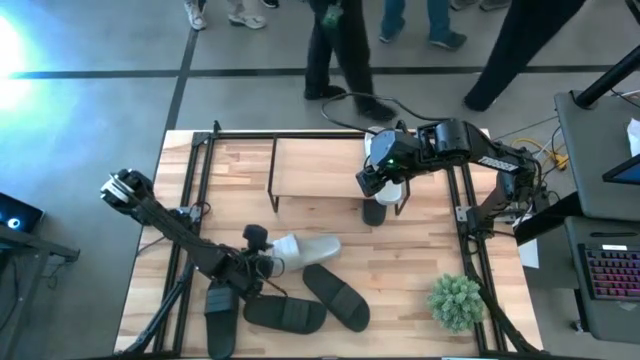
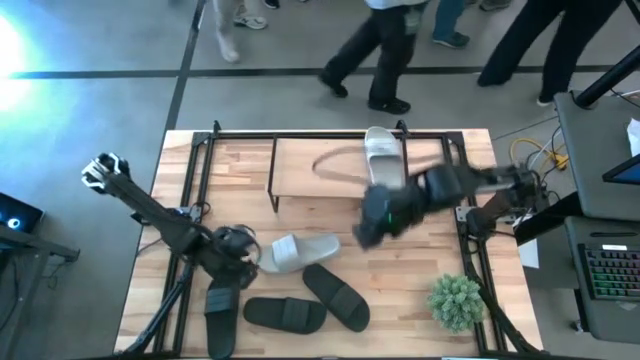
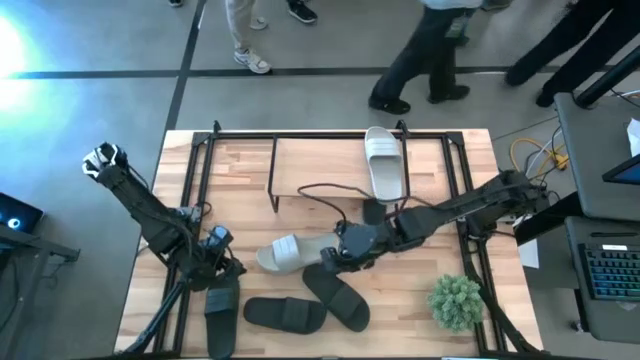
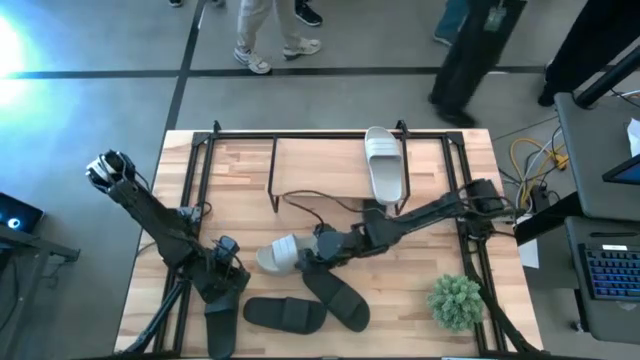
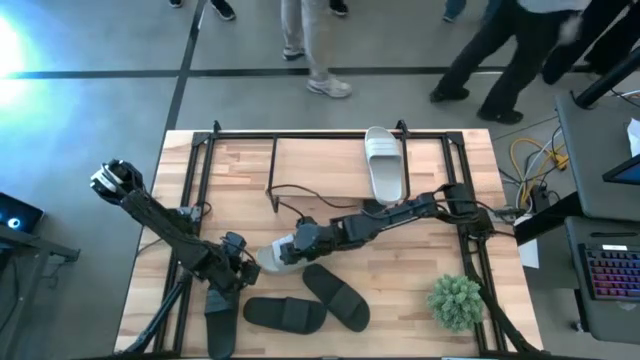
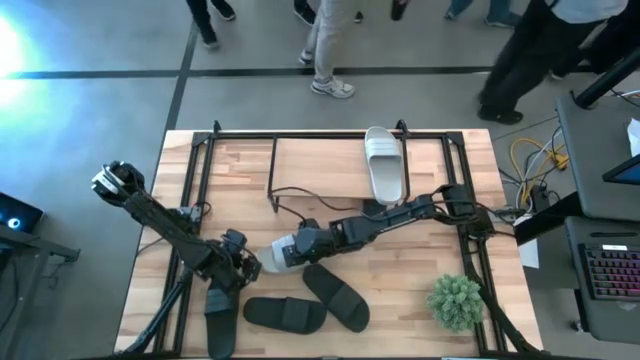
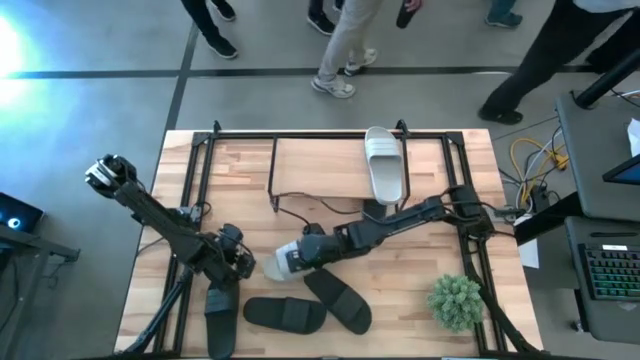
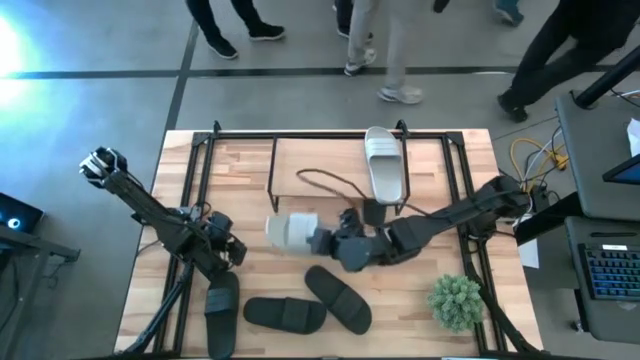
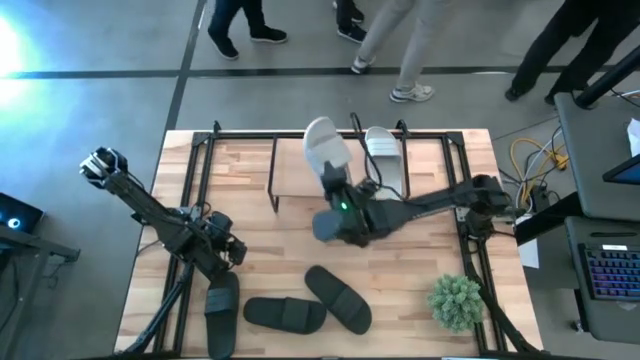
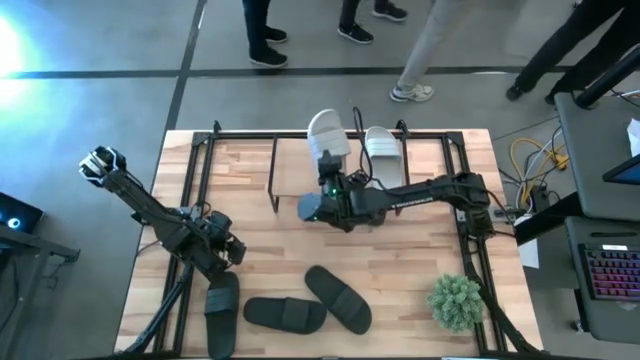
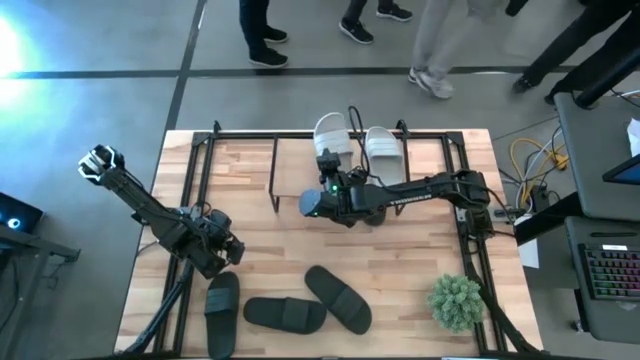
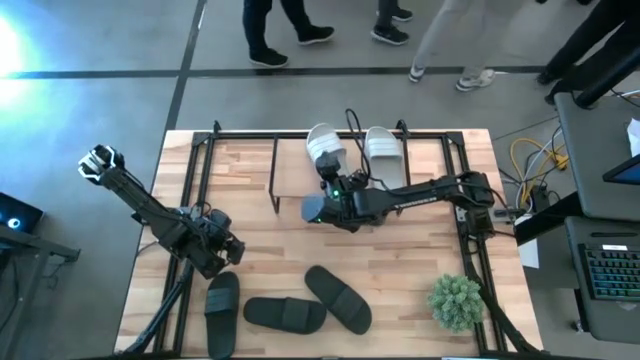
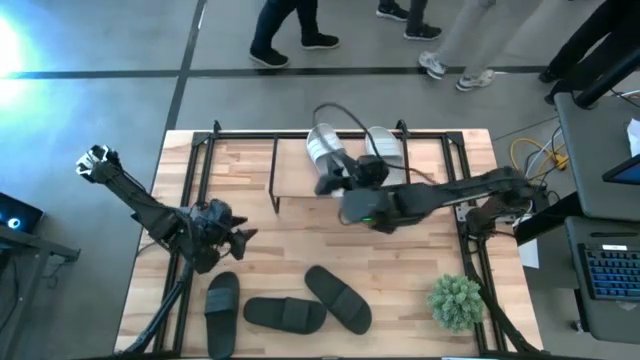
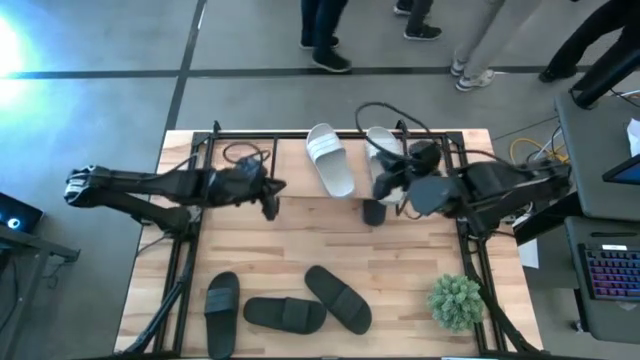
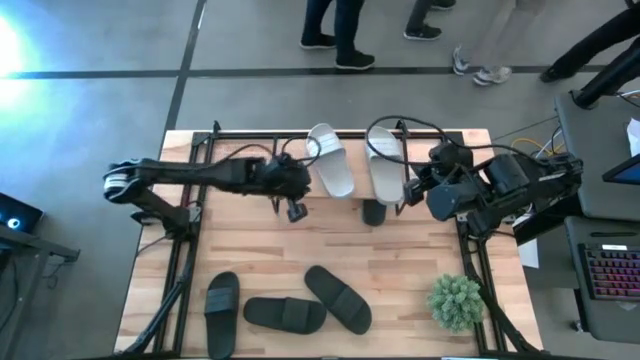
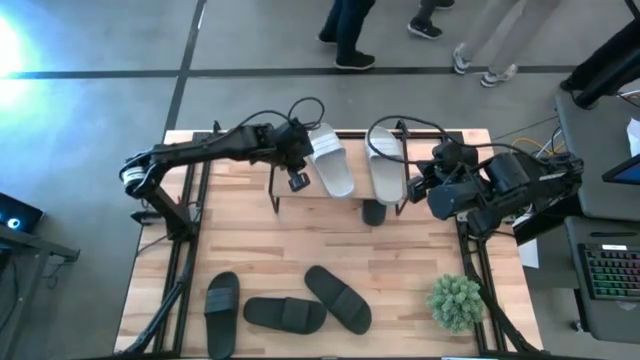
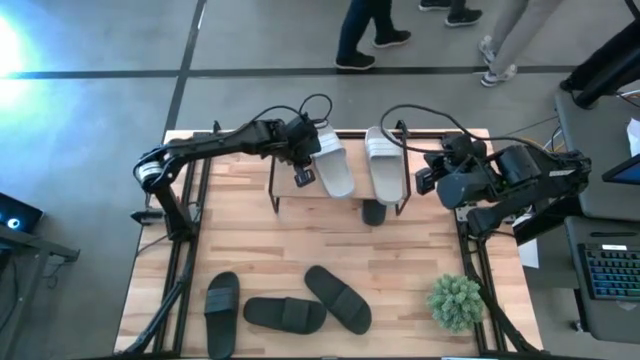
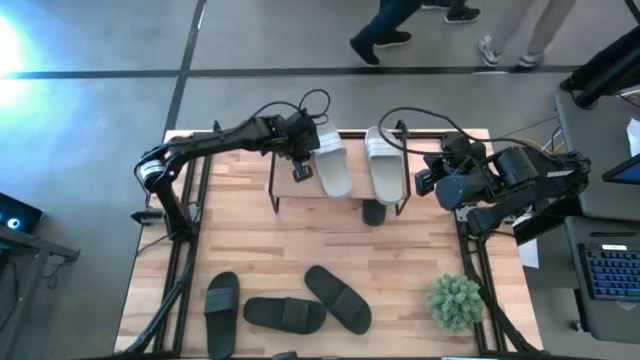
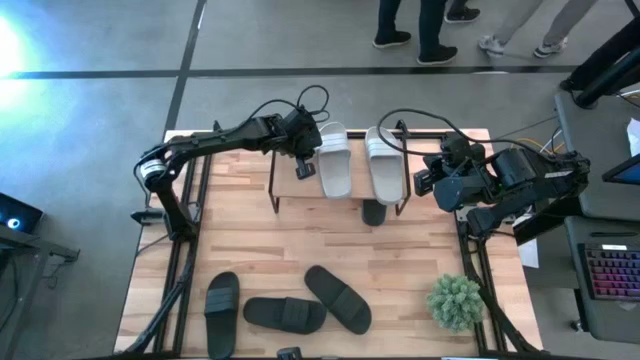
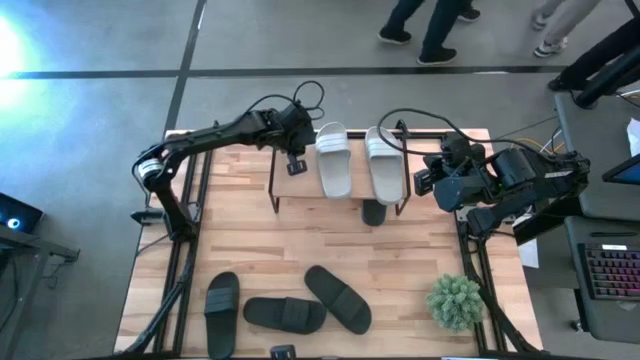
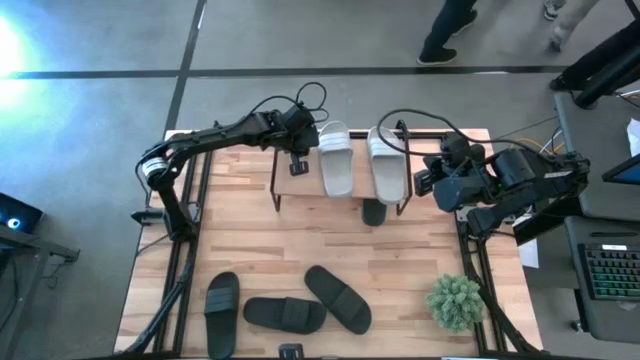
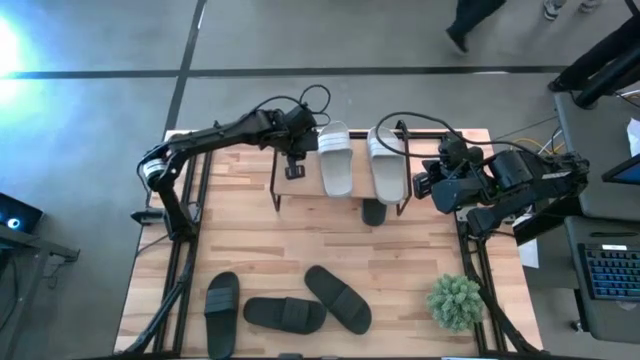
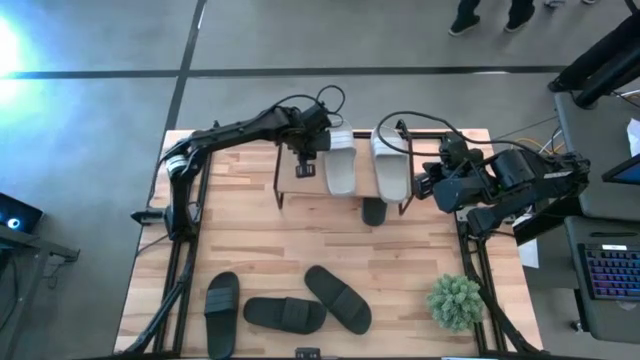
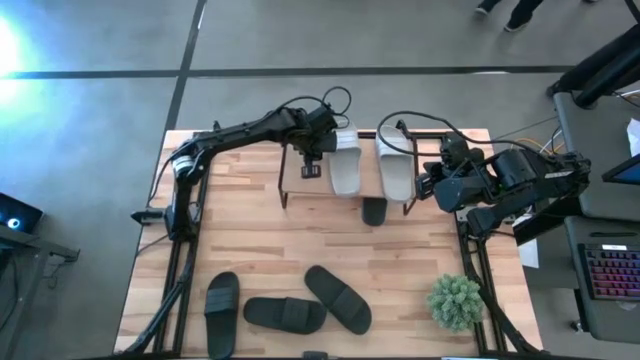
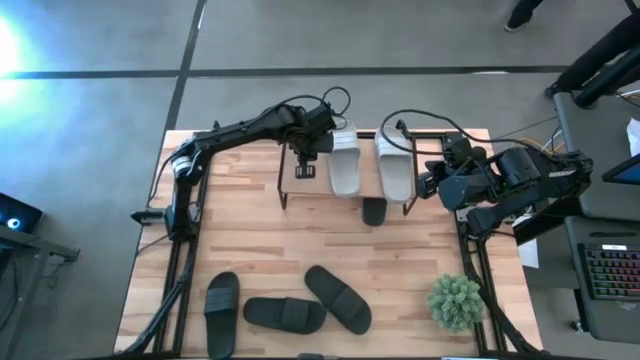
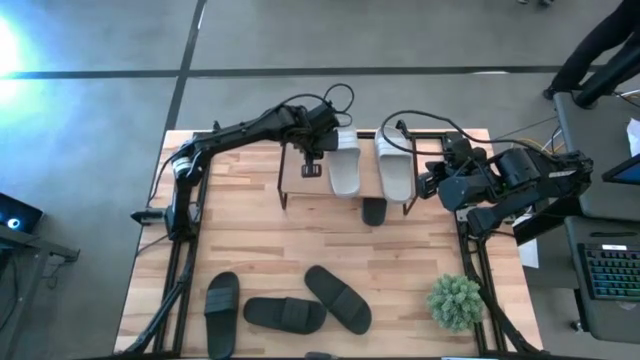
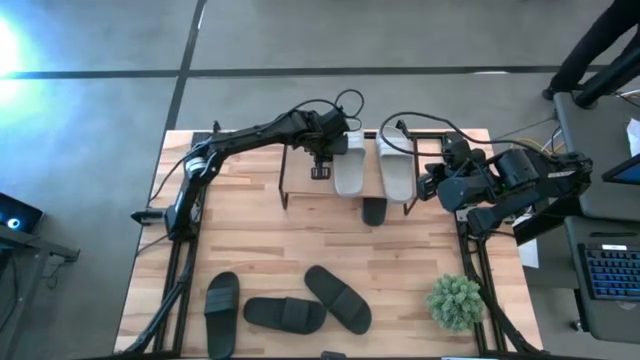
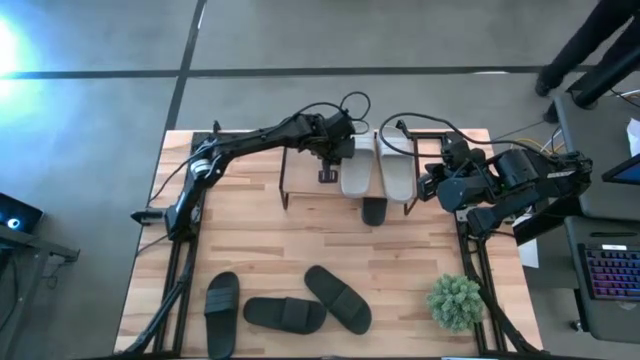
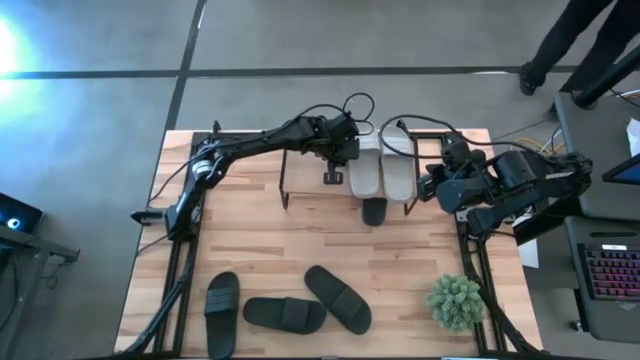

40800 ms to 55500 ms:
Task: Pick and place slides into the shelf
Put the gray slipper on the shelf

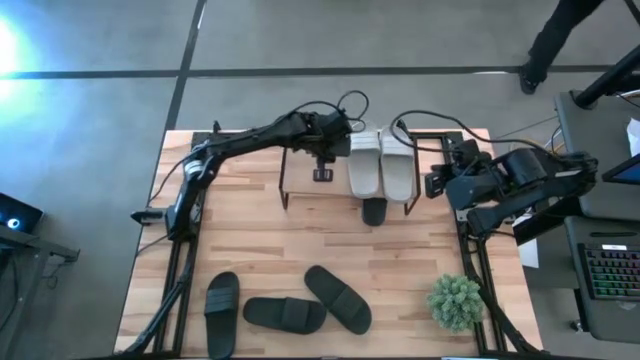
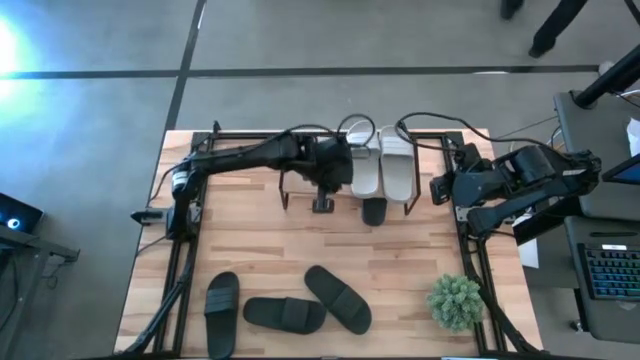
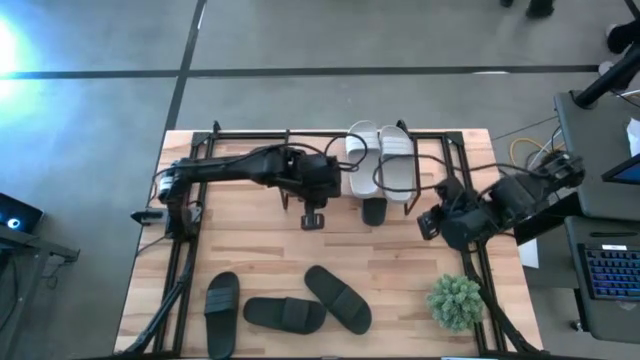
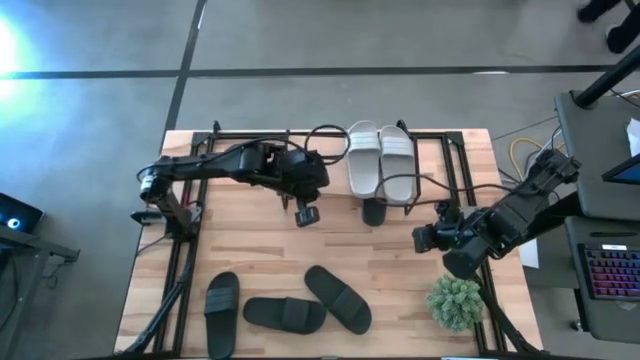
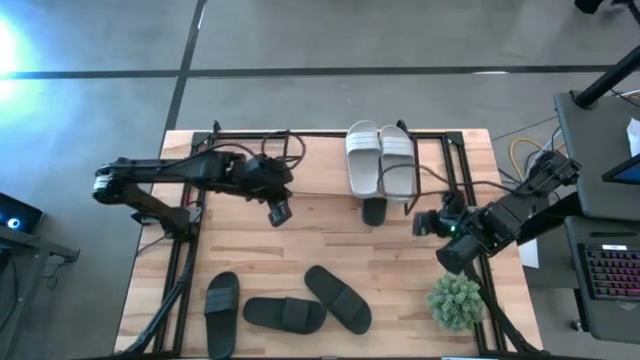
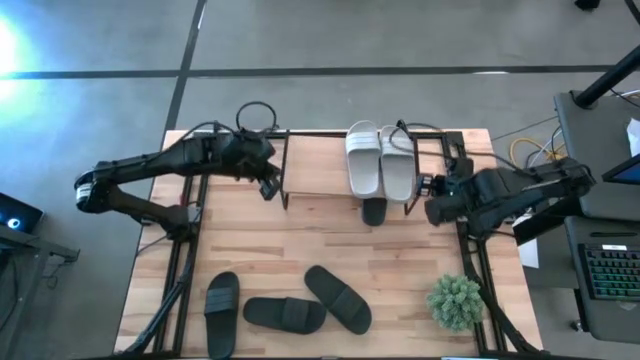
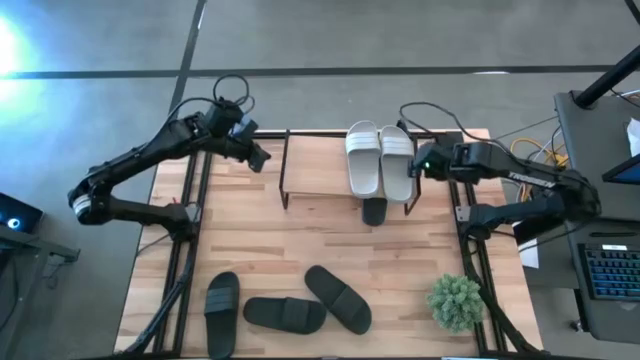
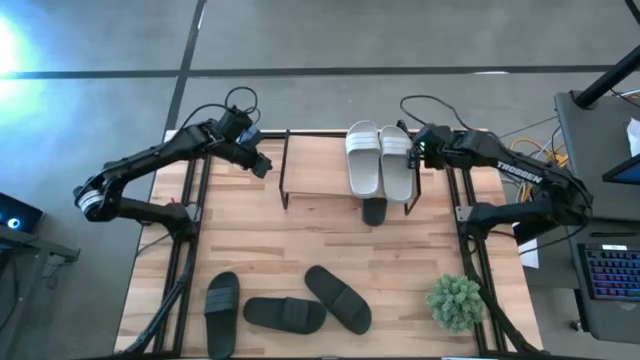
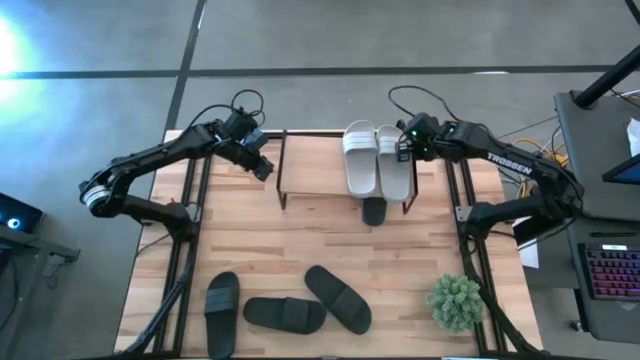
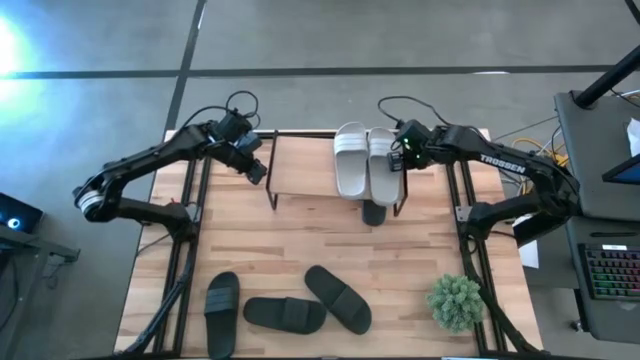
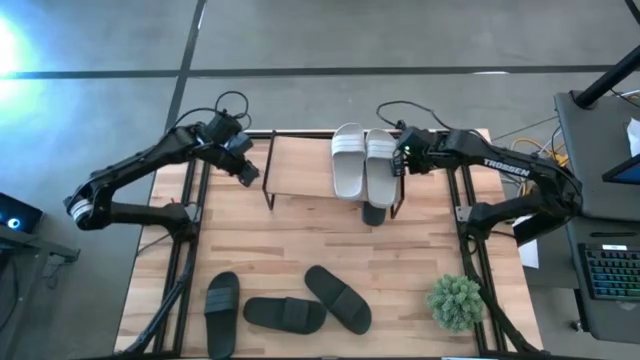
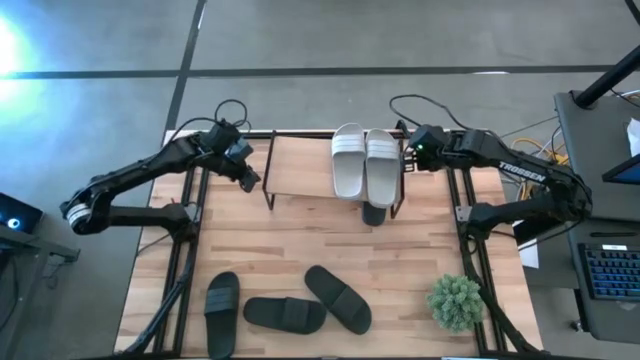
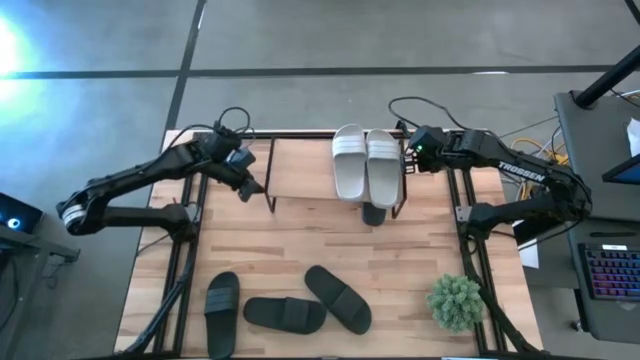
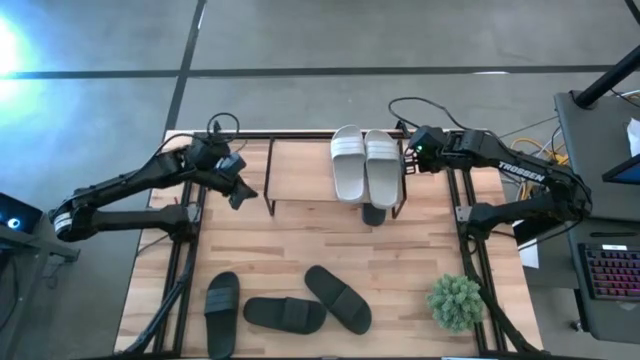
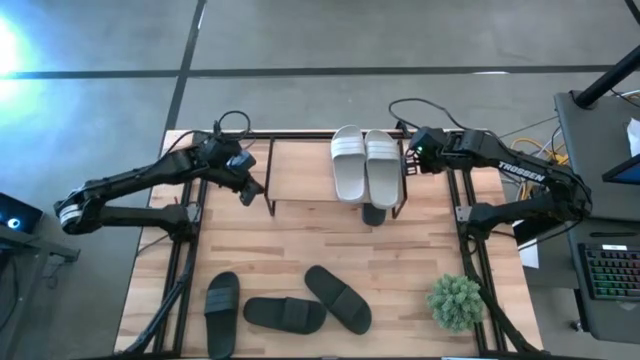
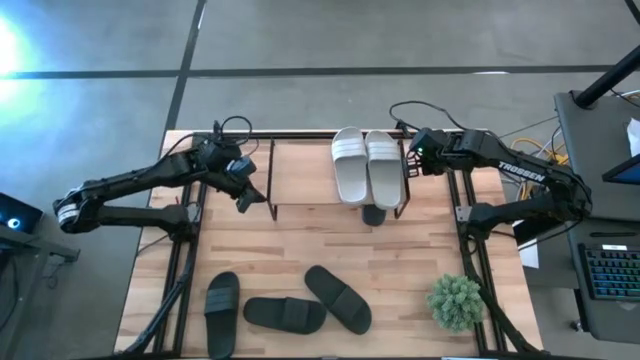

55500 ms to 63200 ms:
Adjust the shelf
